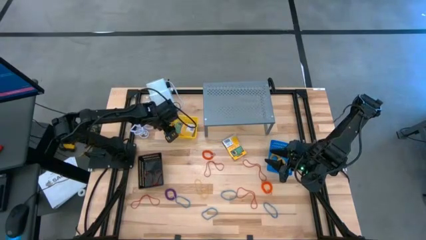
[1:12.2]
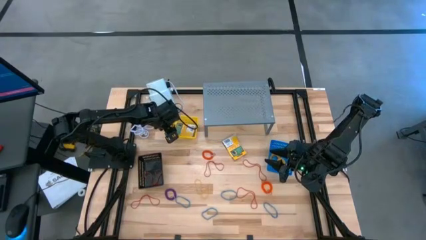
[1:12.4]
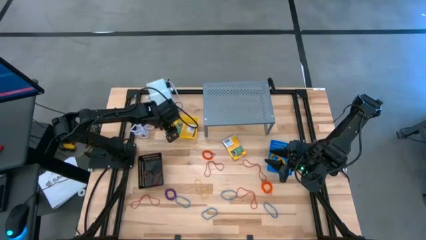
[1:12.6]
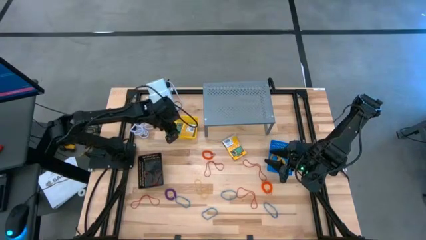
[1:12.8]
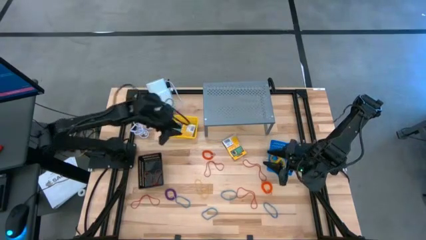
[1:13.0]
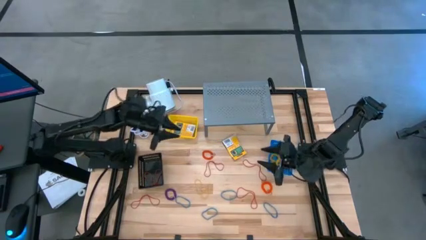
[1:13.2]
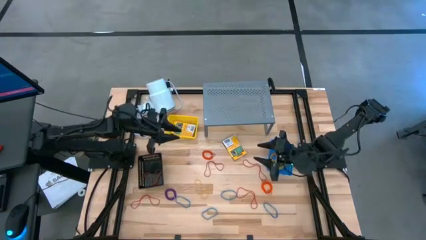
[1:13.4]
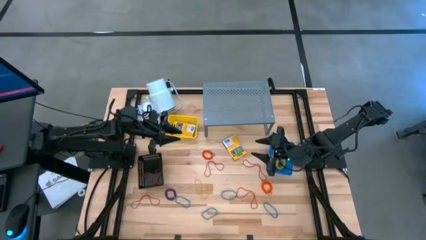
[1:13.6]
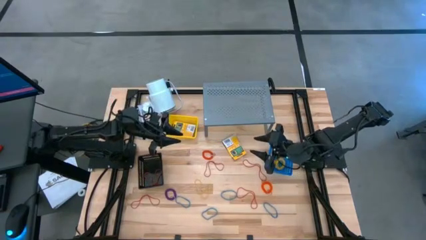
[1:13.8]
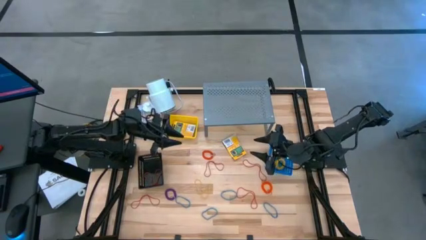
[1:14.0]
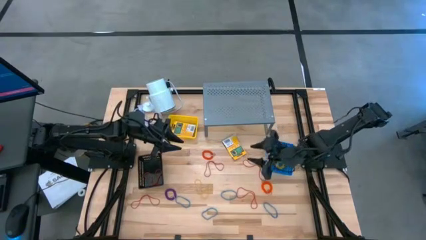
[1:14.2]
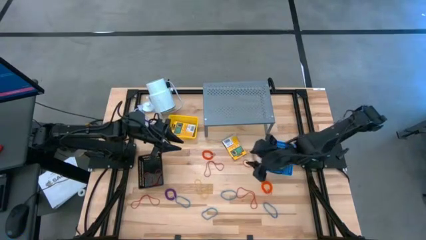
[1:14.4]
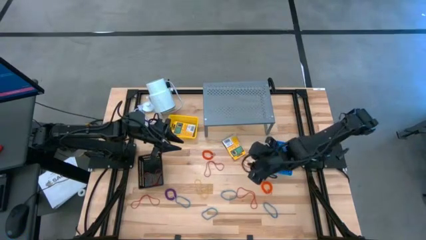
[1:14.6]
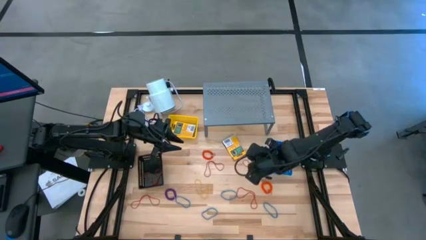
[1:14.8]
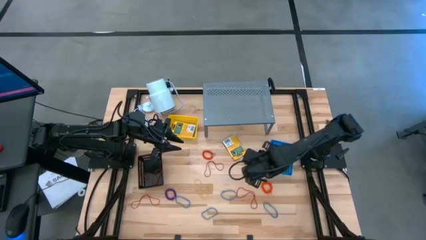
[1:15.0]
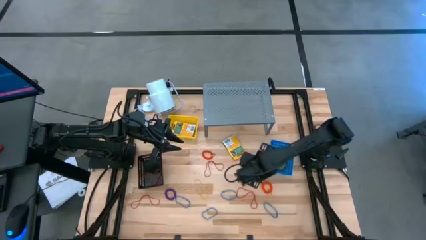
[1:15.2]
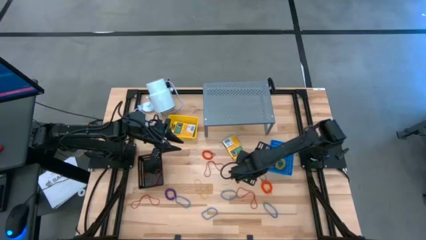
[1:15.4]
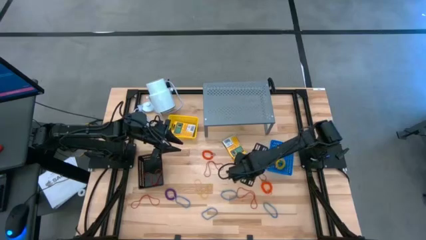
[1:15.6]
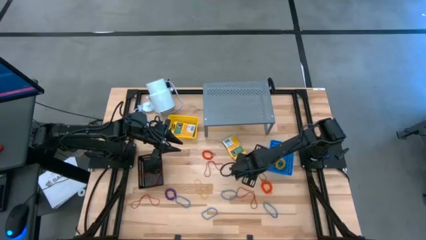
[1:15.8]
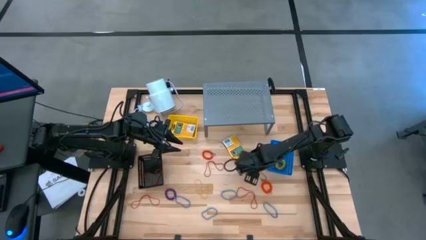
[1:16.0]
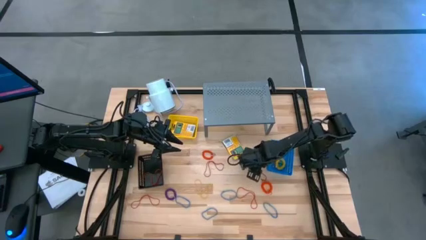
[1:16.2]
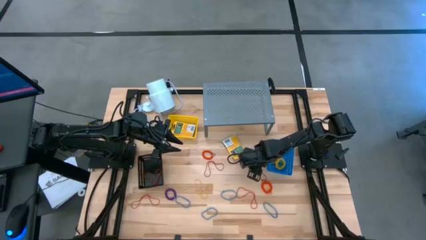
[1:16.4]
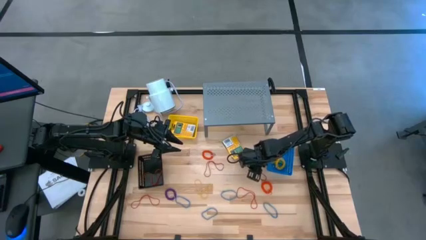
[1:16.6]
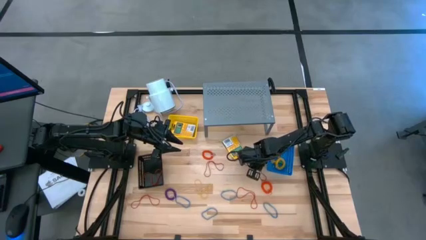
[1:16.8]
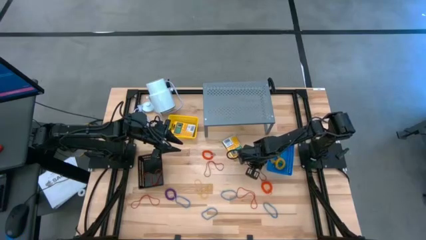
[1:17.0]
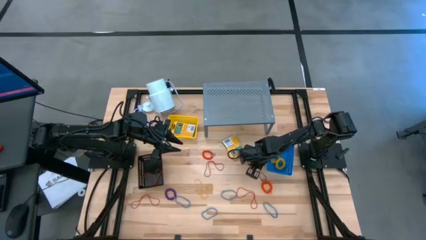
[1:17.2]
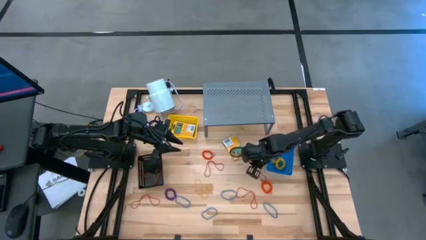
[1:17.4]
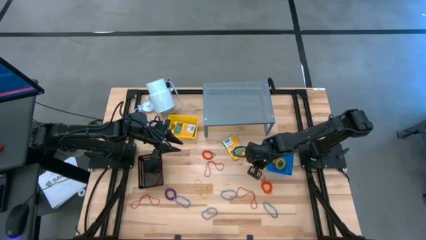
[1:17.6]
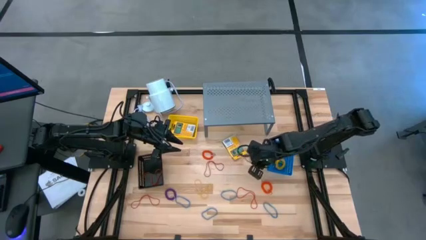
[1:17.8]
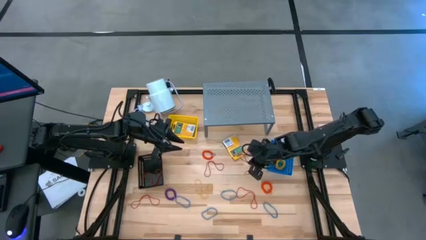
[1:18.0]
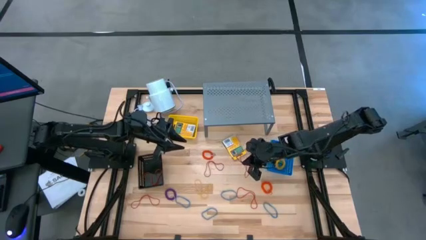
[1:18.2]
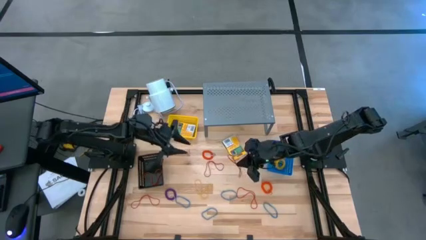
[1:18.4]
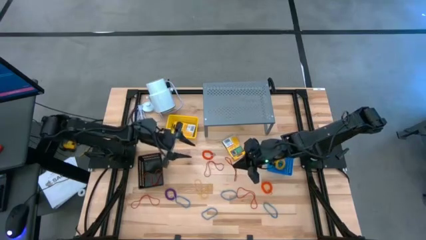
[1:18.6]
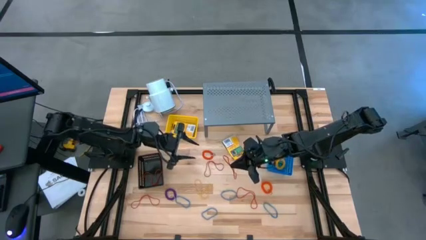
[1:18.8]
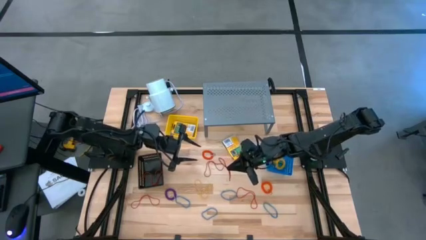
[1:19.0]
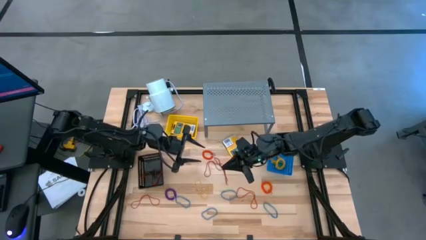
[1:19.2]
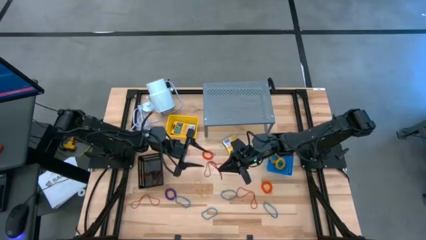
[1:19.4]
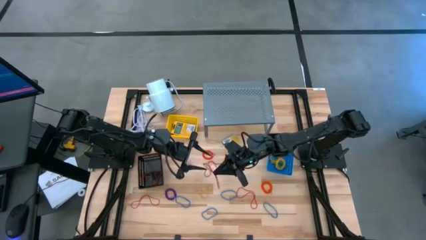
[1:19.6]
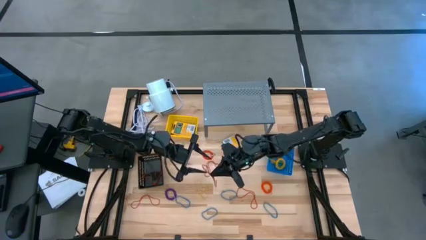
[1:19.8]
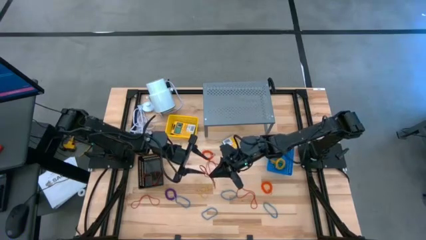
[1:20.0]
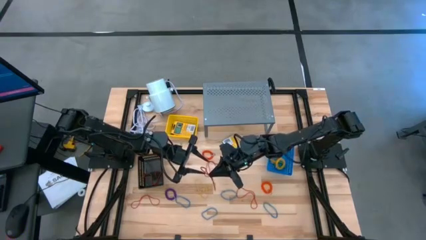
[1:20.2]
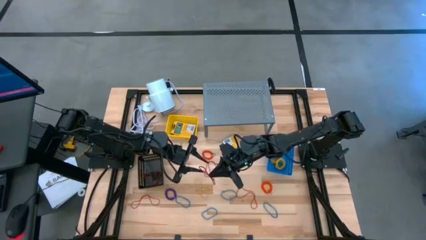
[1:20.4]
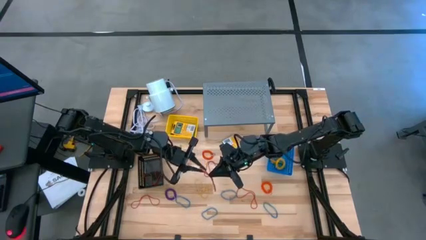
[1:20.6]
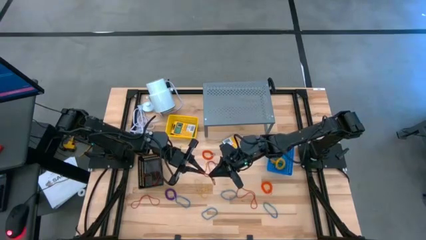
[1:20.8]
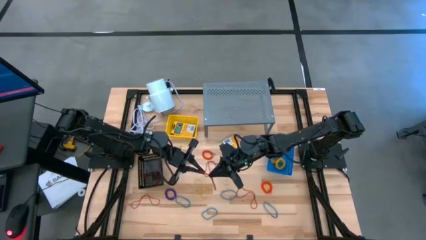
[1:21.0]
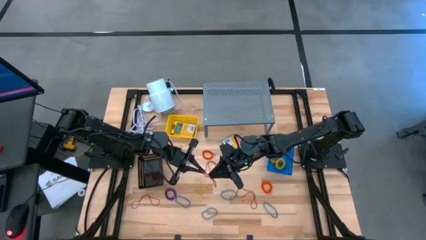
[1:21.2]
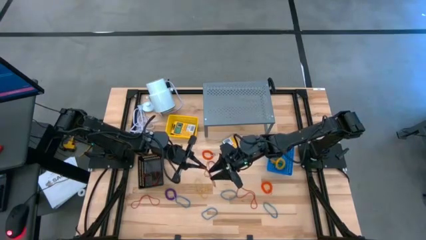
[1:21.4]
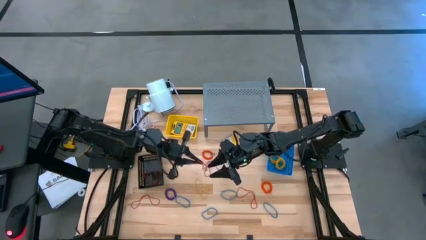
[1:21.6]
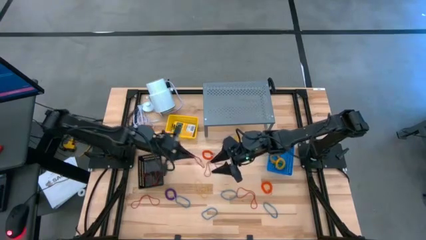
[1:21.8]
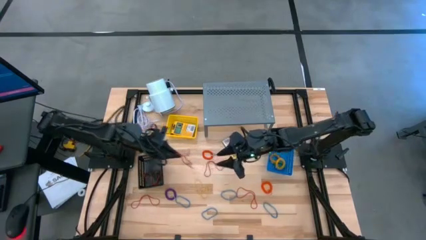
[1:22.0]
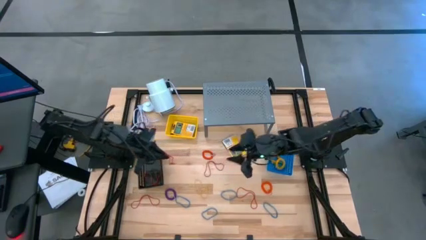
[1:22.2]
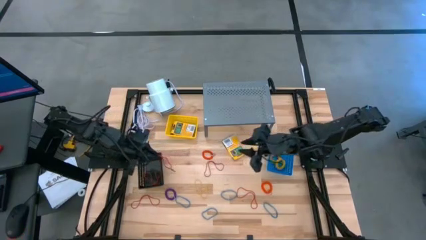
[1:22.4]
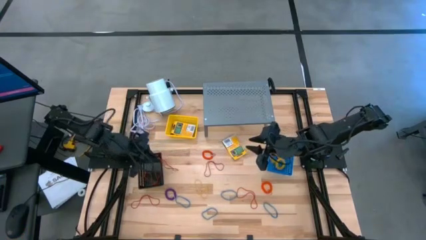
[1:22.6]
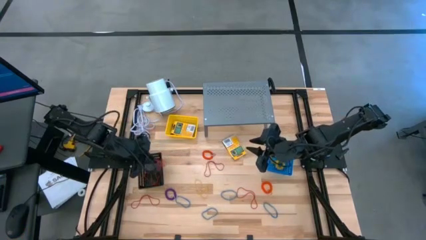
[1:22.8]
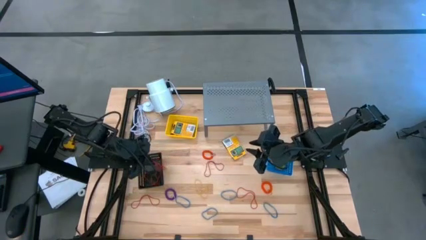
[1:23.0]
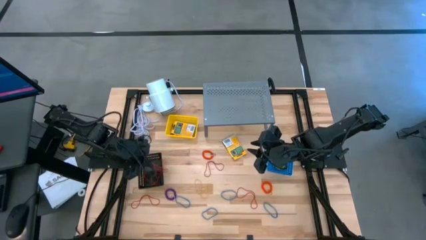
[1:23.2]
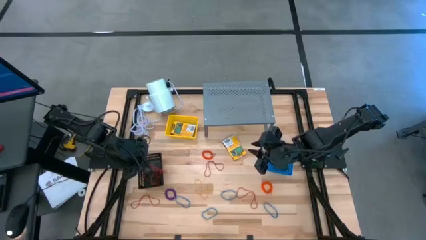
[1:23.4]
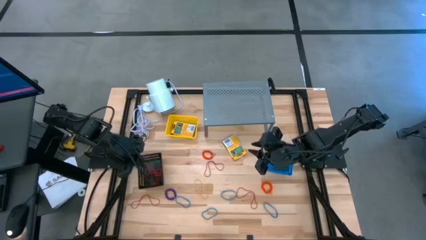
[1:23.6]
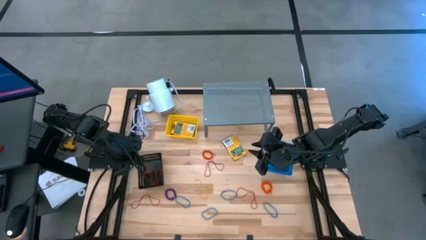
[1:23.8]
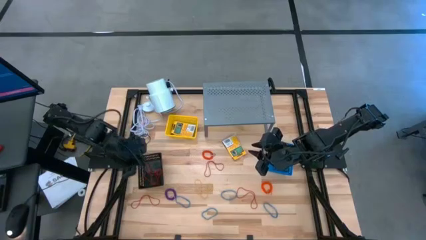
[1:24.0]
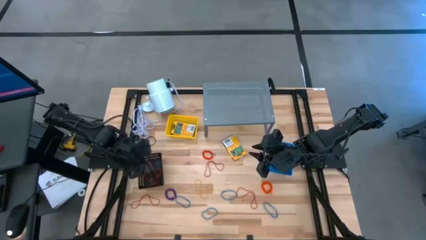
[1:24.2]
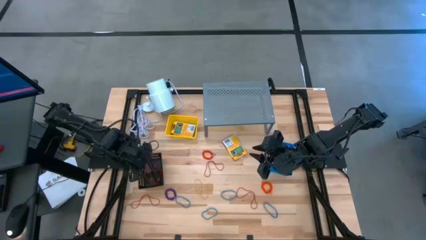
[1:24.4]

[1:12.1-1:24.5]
Task: Pick & Place Office Desk Supplies
Put the red rubber band into the black bin
